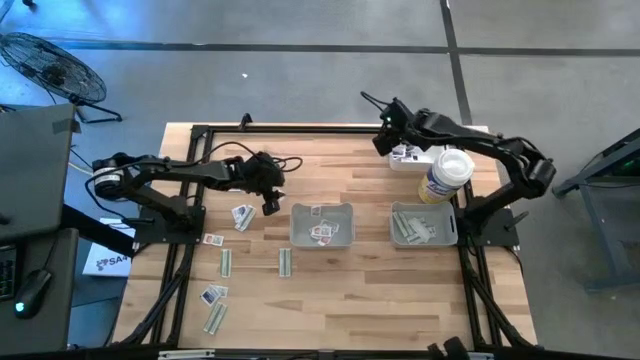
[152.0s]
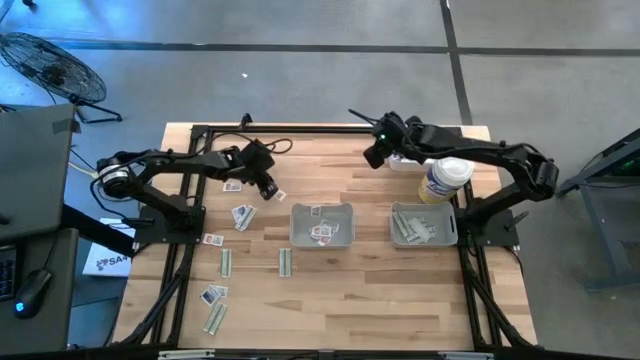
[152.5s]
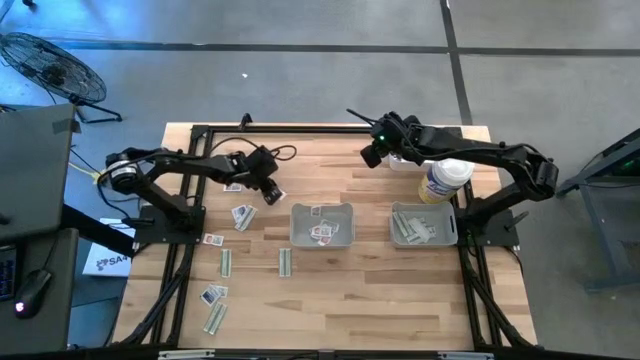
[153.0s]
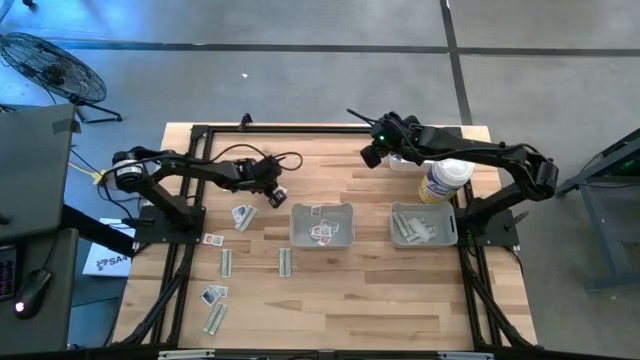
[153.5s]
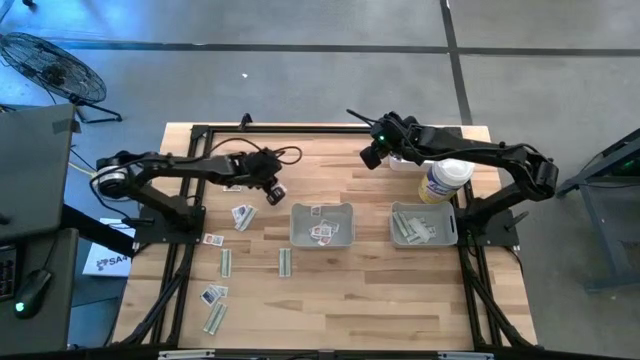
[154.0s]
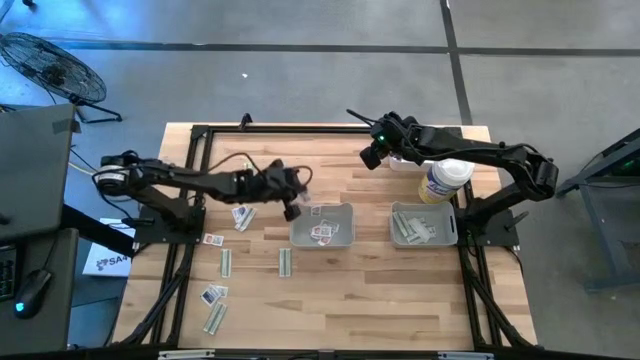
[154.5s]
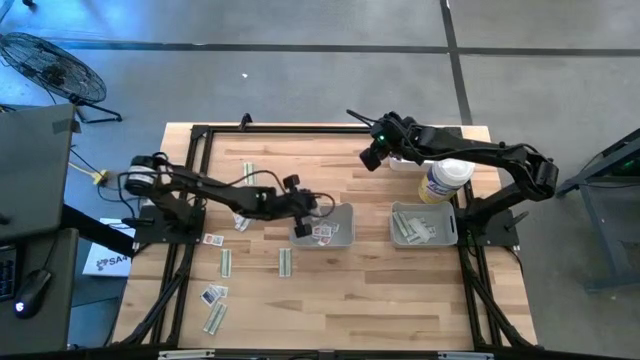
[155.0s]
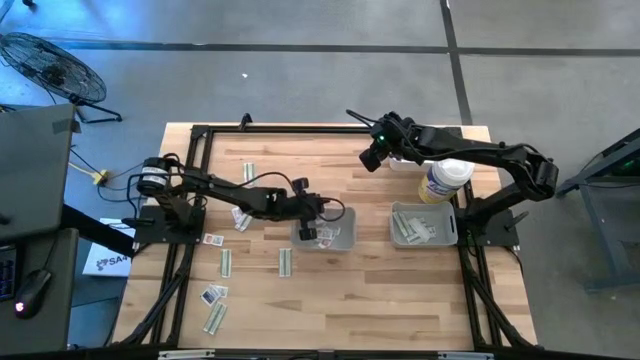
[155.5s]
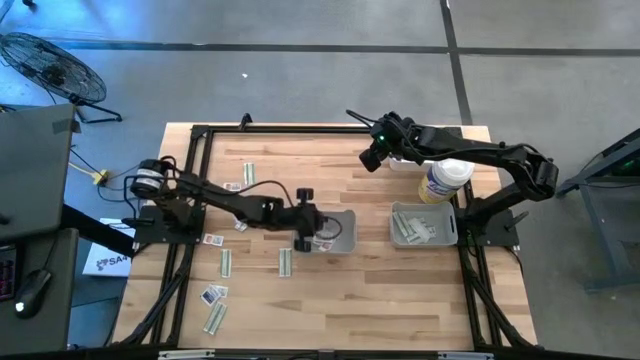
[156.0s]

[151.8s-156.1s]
Task: Pick & Place First Aid Supplies
Put the orange pad into the left gray bin

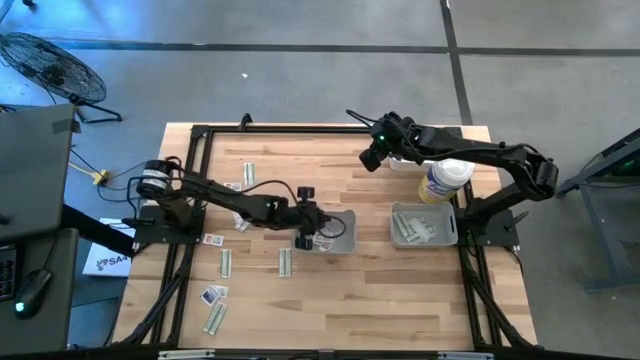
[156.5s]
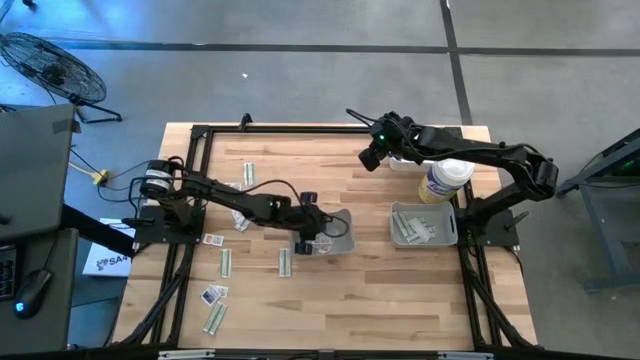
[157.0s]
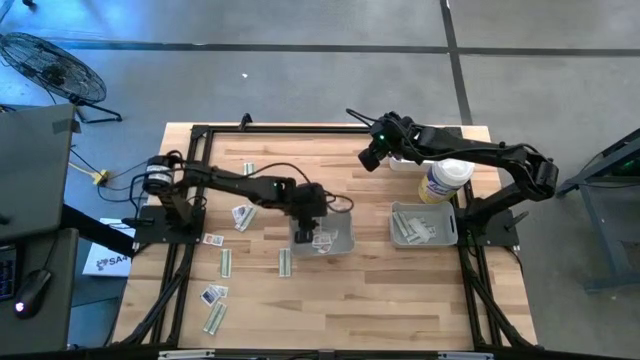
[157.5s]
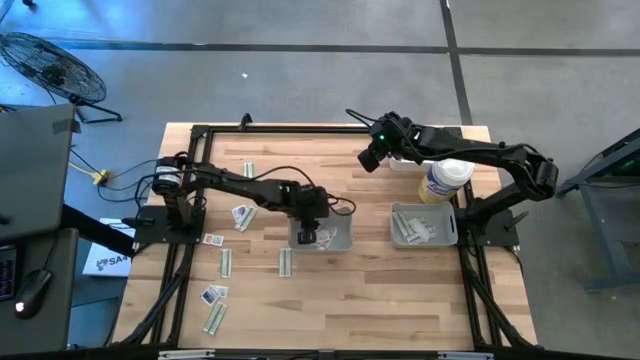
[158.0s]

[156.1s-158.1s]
Adjust the orange pad in the left gray bin

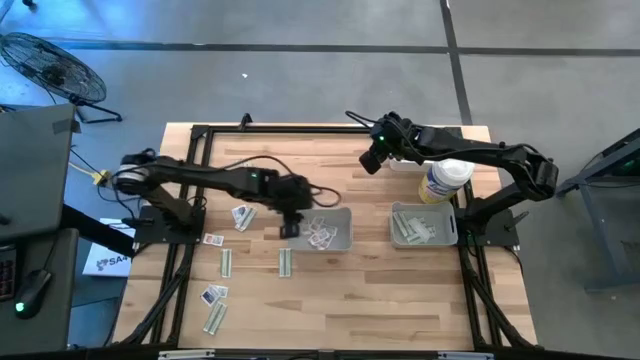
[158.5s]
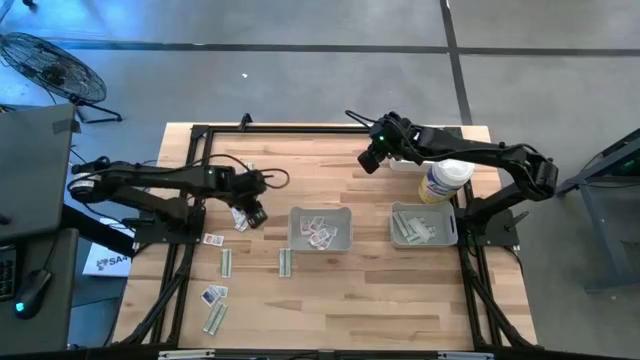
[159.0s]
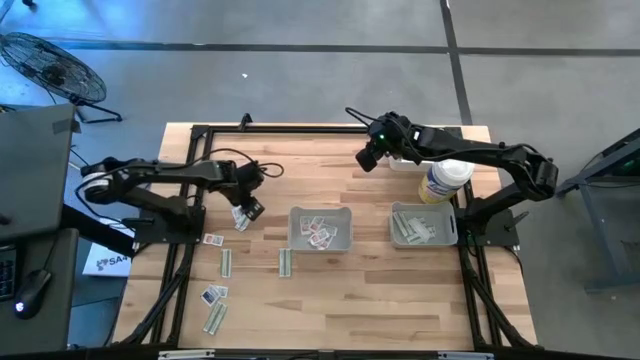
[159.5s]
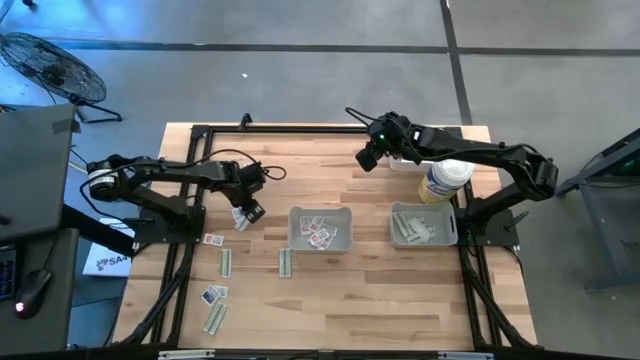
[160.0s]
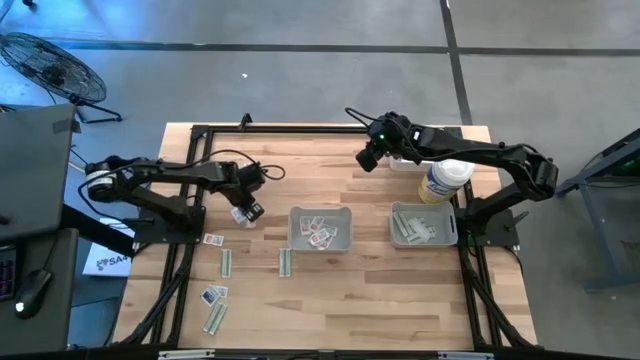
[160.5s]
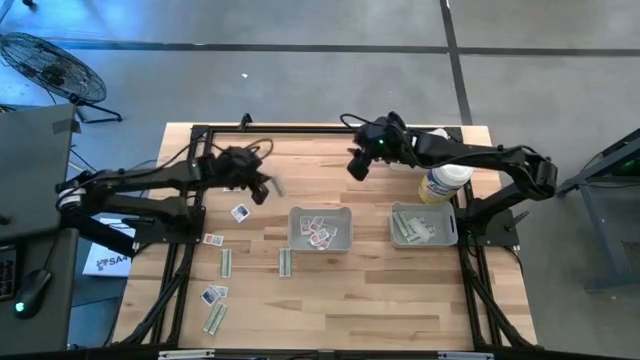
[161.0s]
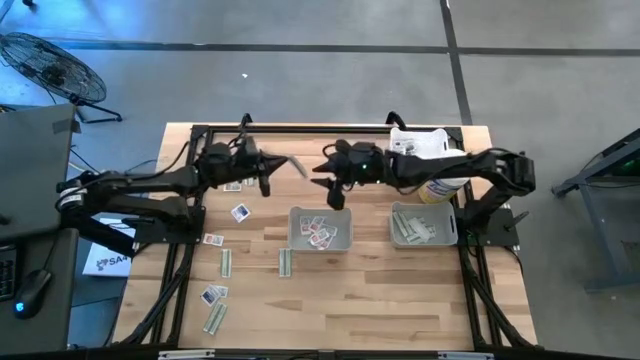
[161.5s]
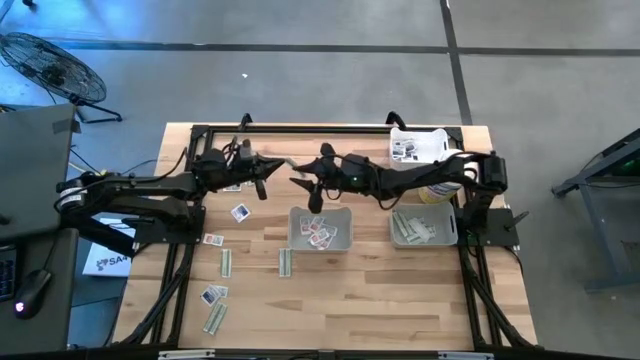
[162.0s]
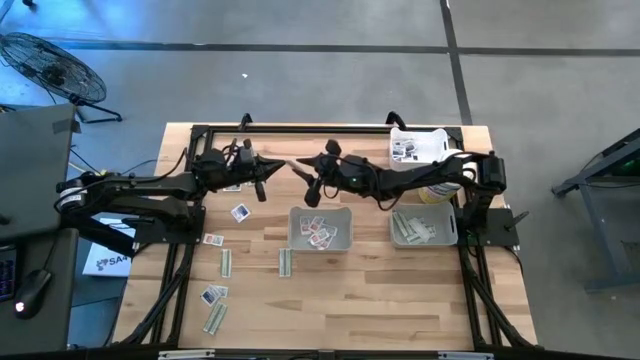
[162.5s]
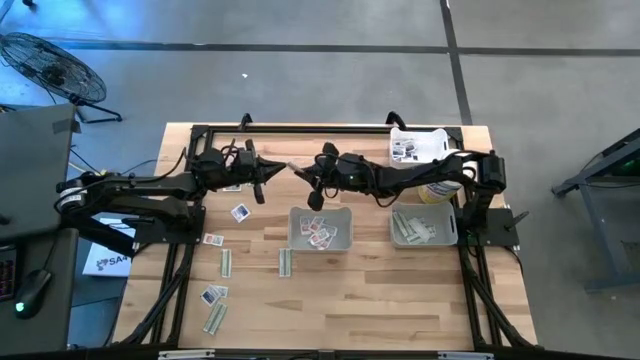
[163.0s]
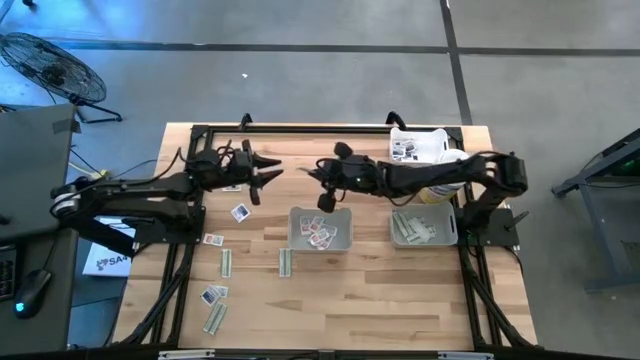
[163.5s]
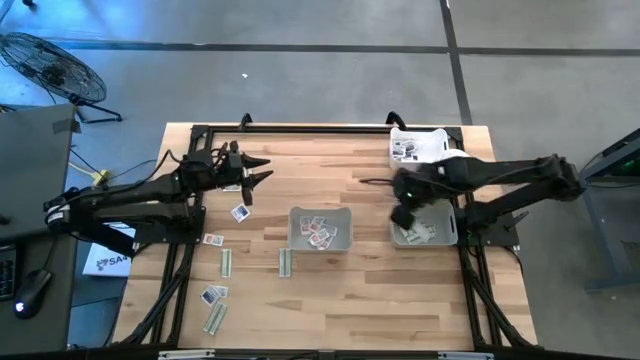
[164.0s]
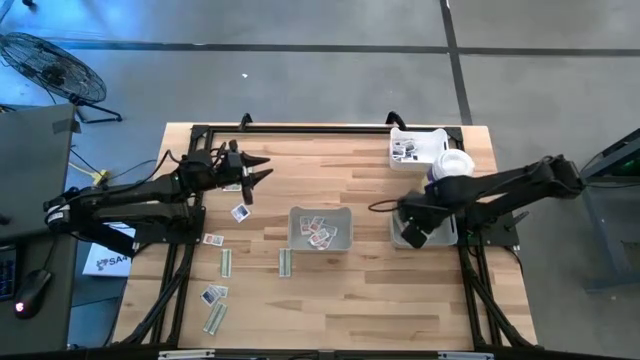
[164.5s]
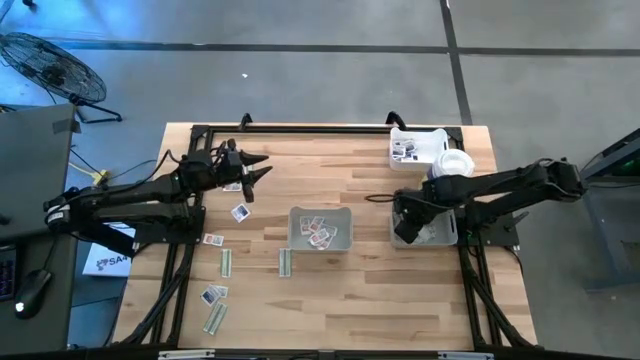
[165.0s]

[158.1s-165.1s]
Put the green pad into the right gray bin

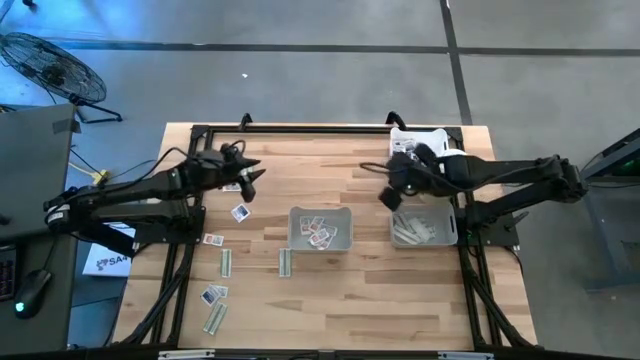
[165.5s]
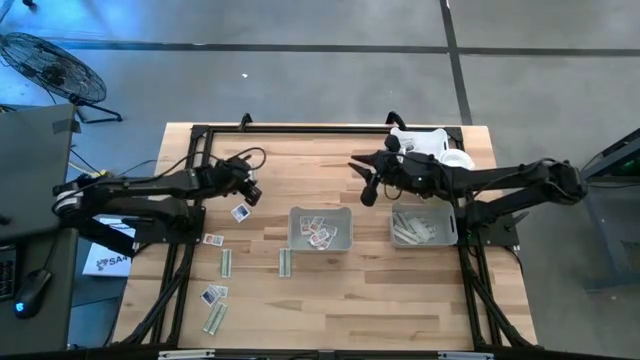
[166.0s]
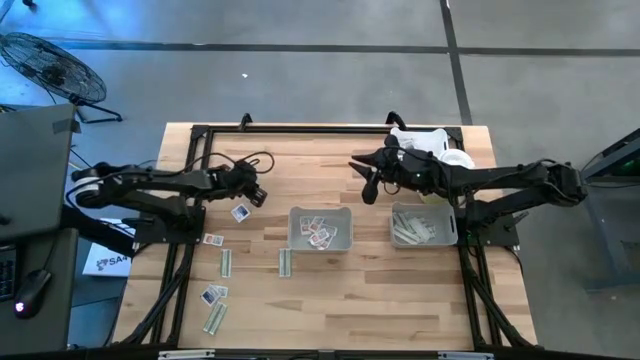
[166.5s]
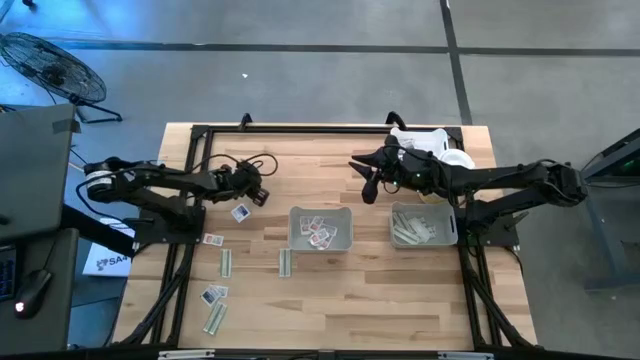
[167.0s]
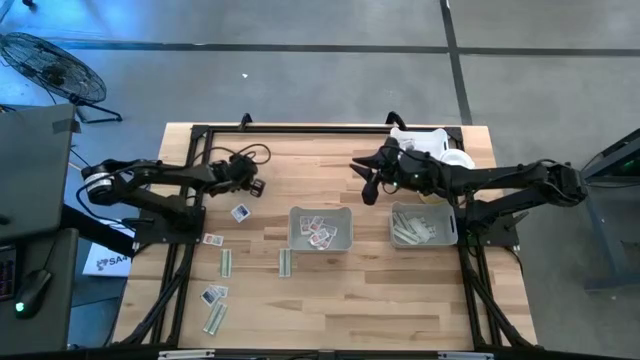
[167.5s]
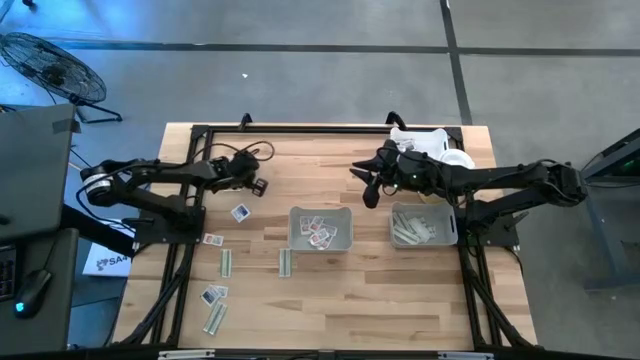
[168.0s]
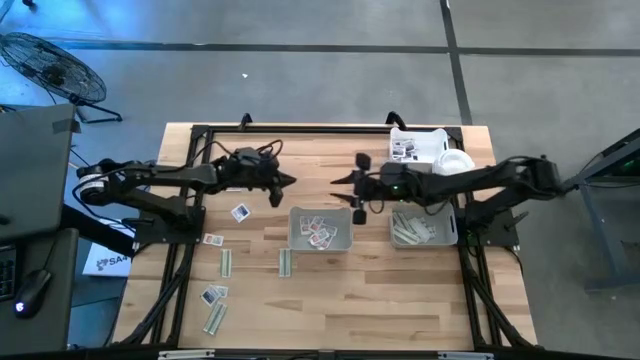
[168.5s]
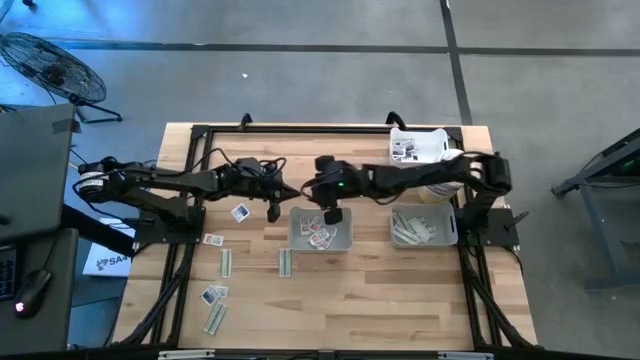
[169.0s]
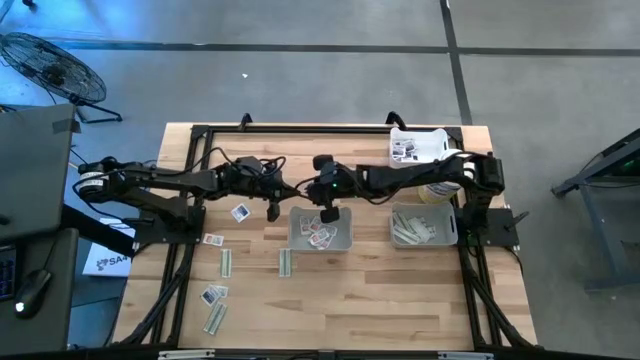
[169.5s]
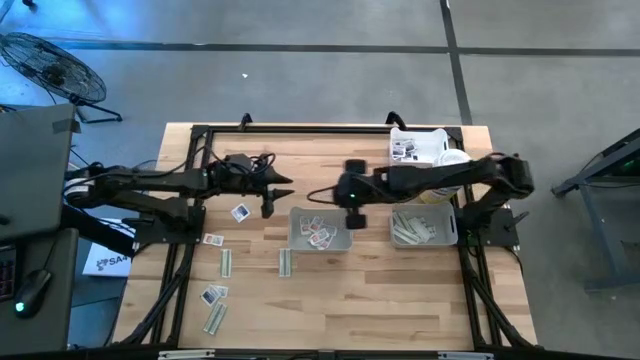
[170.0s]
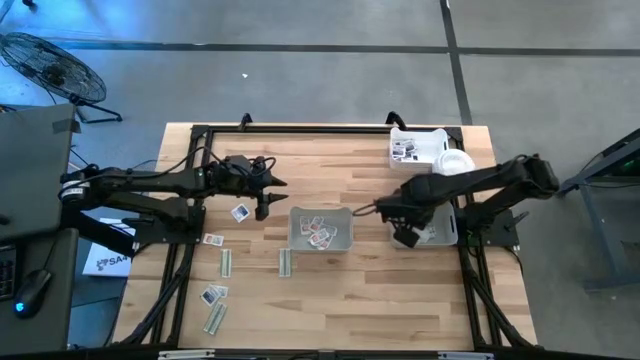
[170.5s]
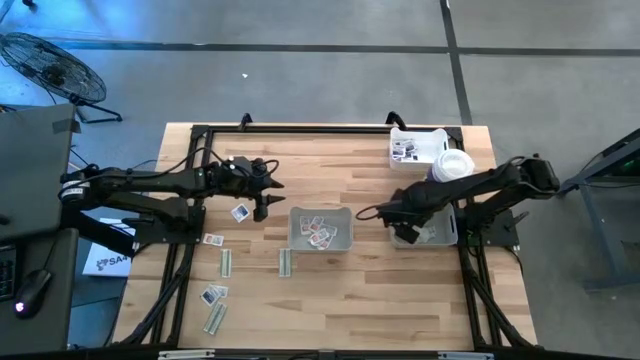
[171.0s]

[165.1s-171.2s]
Put the green pad into the right gray bin

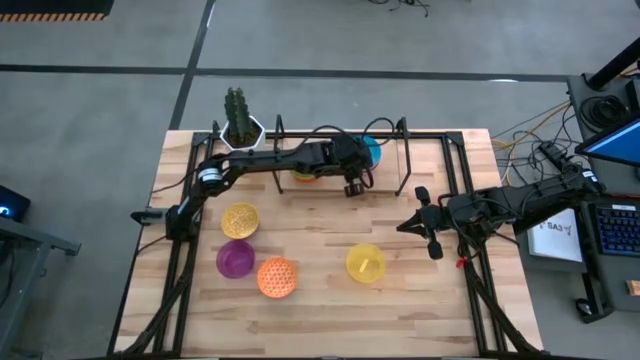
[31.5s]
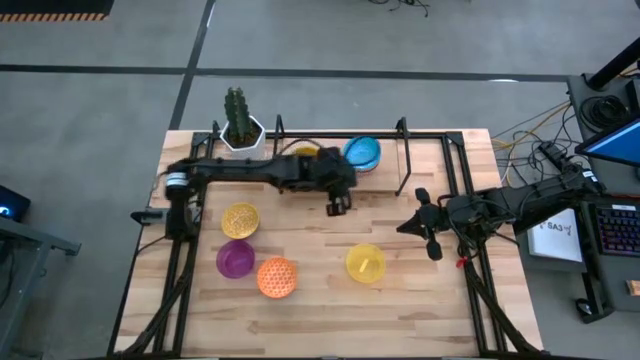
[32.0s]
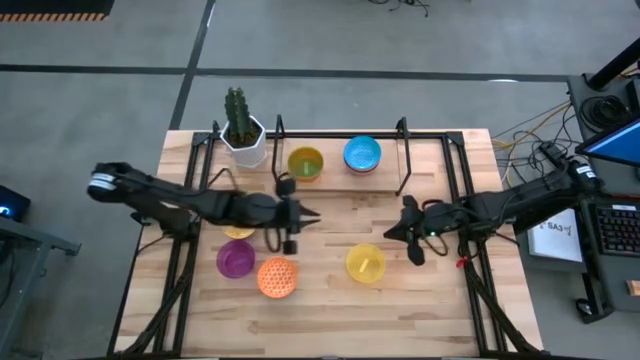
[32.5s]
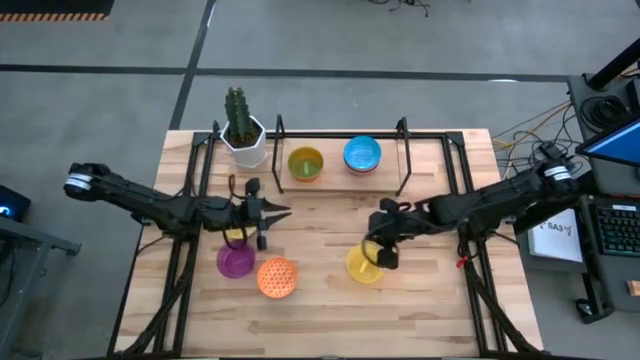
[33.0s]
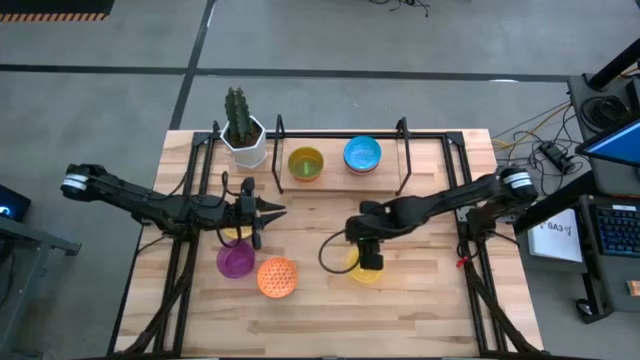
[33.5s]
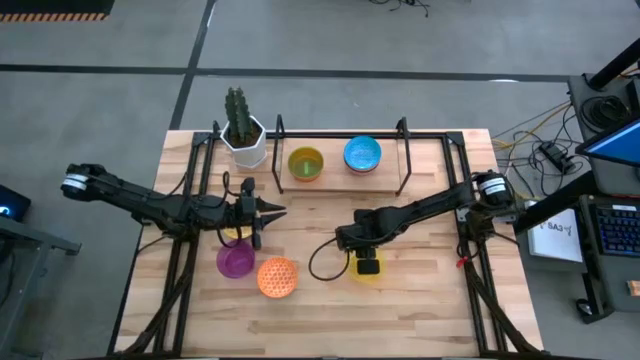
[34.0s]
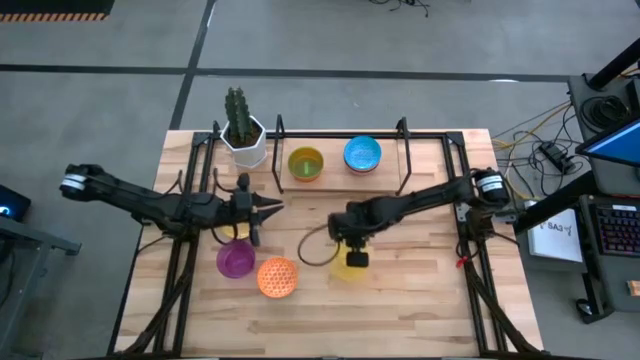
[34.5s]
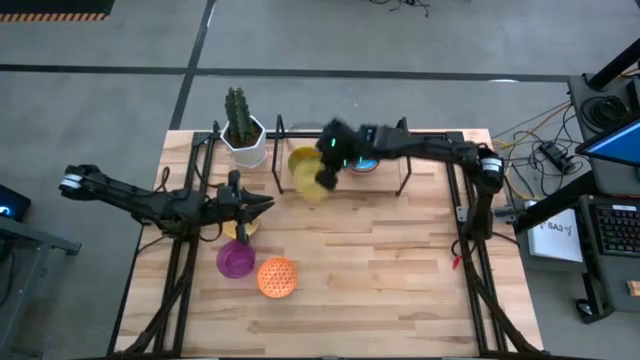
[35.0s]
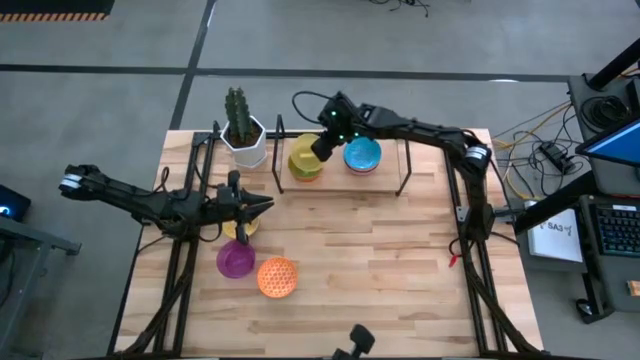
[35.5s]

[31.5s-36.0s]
Task: Place and stack bowls onto a shelf
Stack the yellow bowl on the green bowl on the shelf
